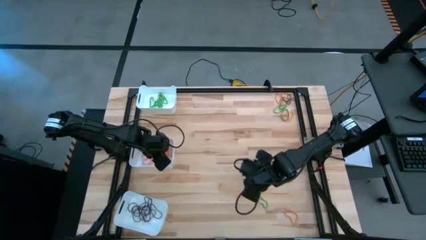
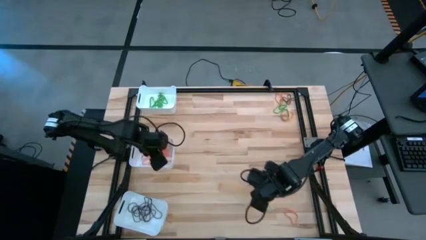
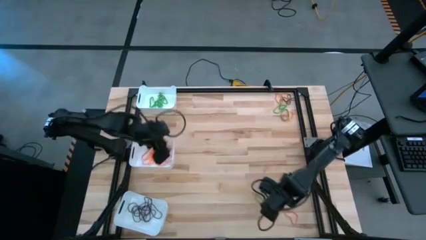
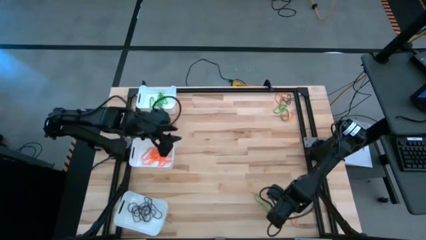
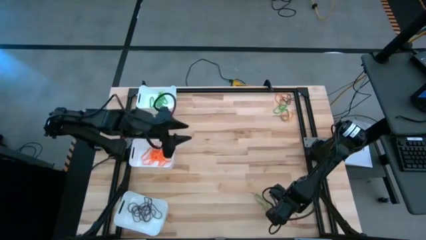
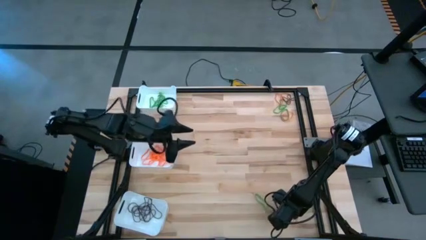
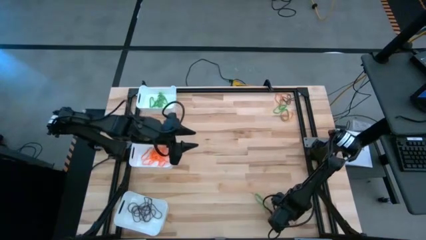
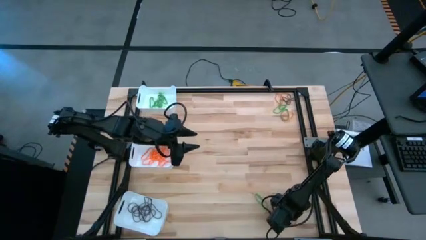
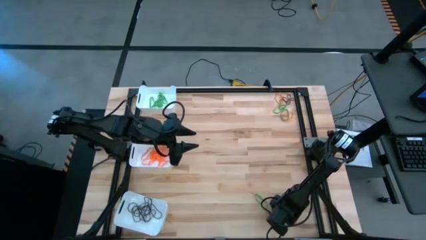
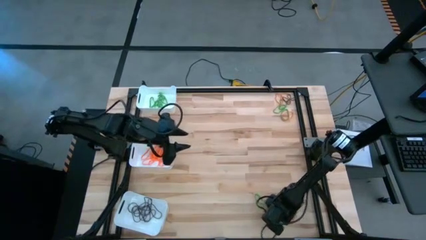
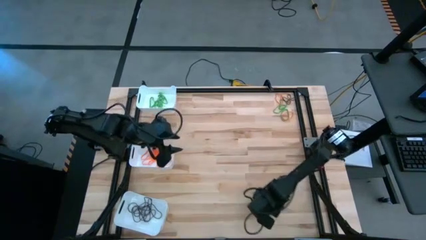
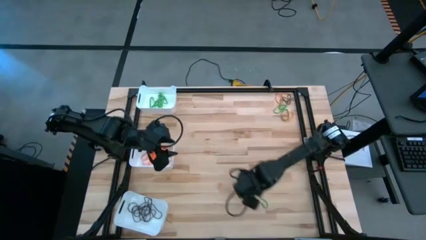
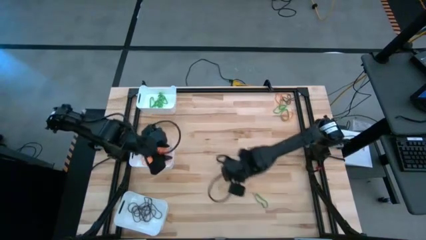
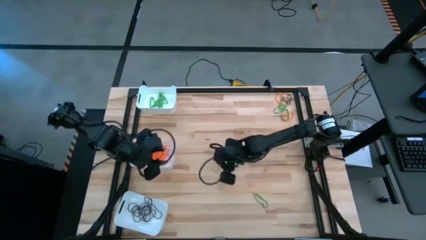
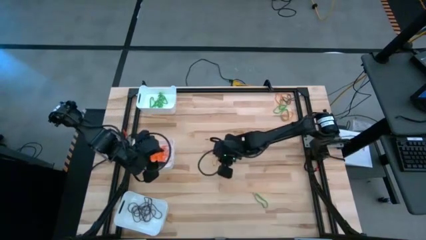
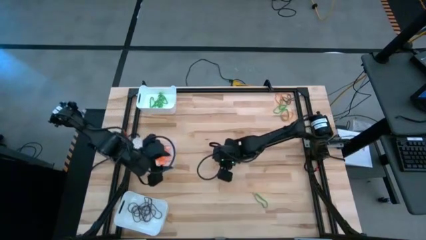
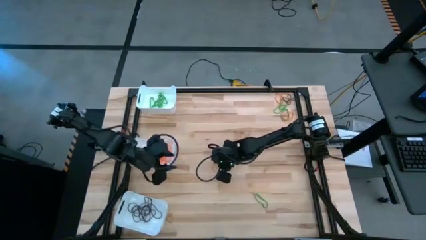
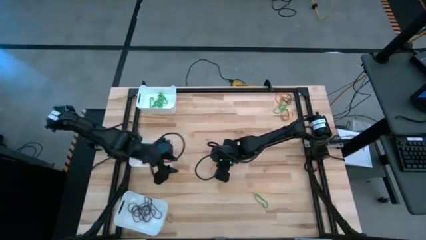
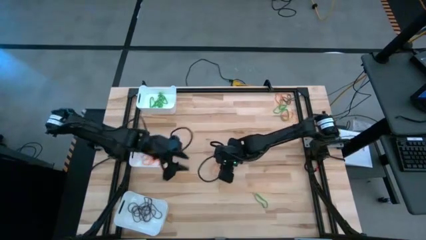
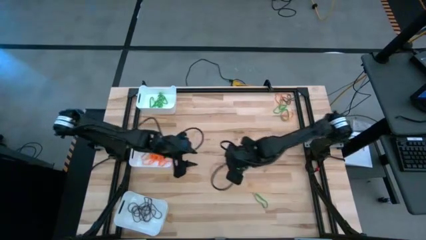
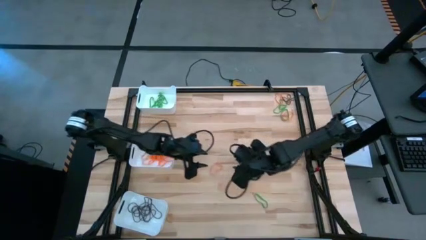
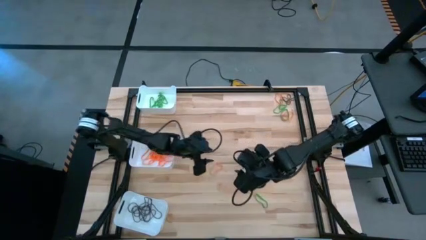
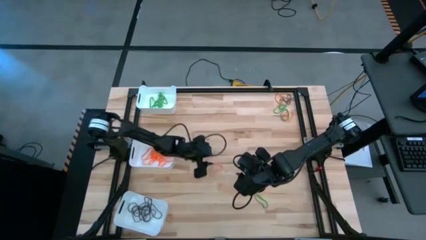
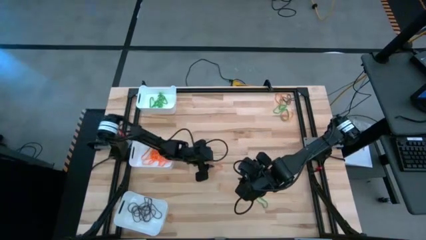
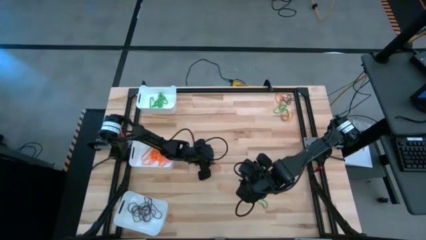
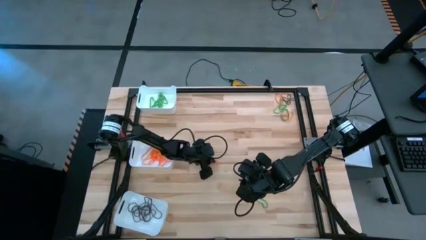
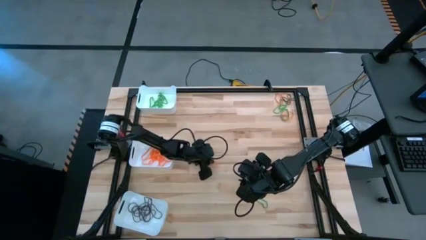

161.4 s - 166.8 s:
Task: Sort rubber bands into baskets
Put the orange rubber band into the middle white bin

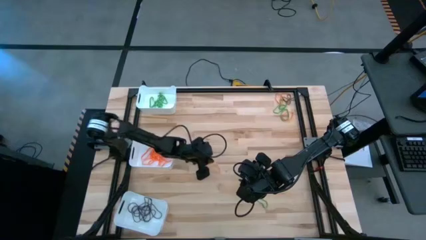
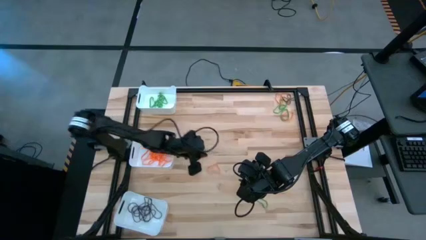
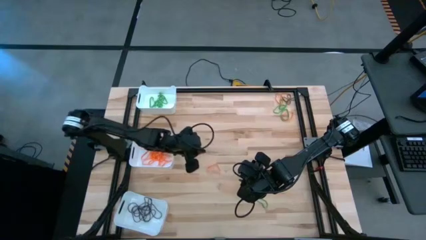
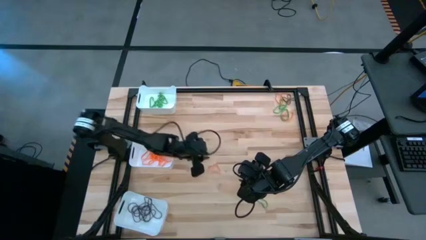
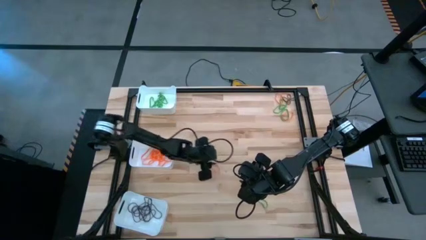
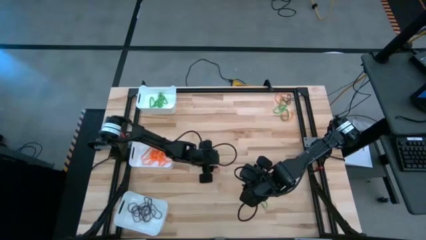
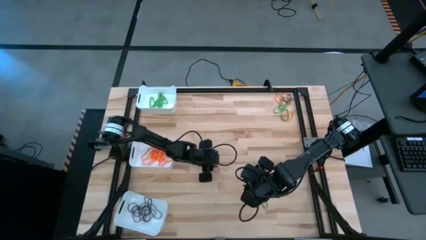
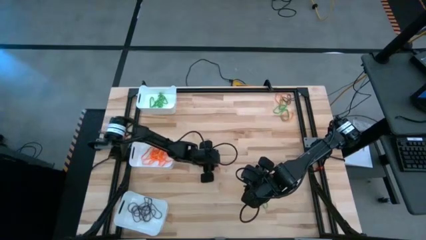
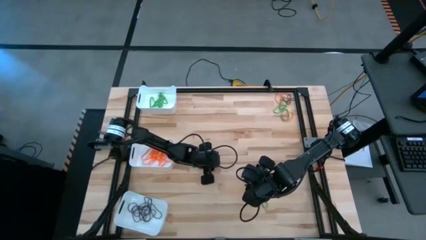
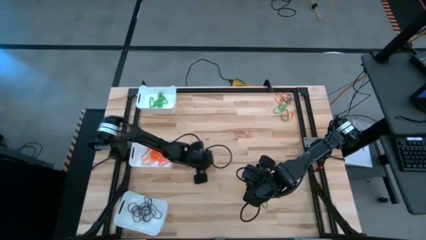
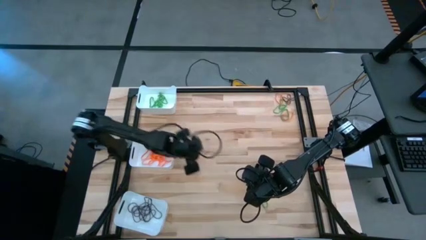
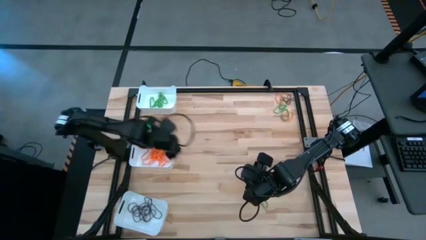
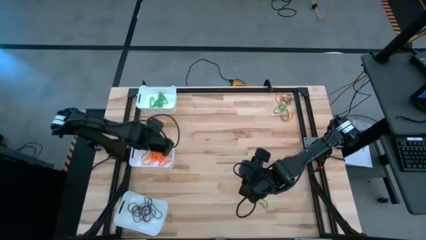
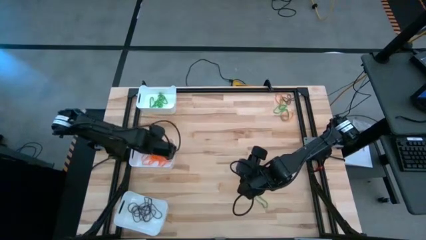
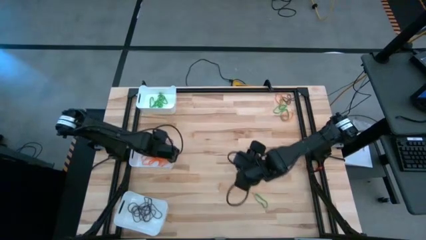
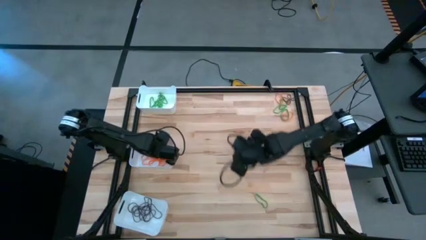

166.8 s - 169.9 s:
Put the orange rubber band into the middle white bin

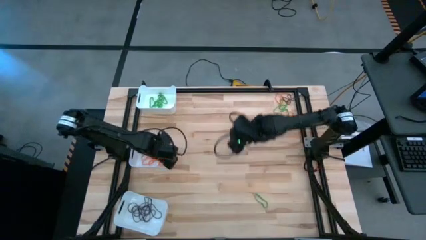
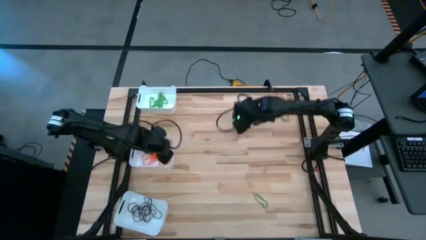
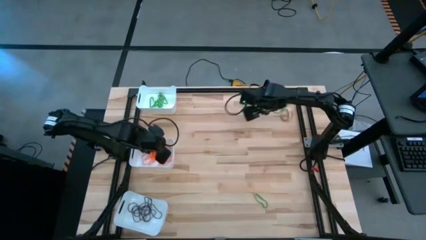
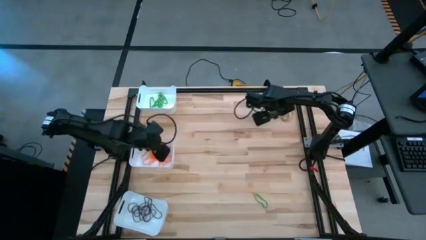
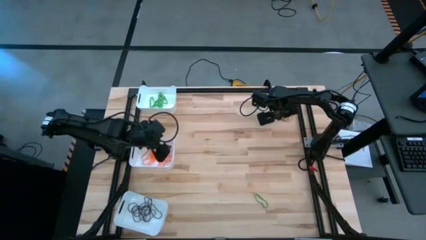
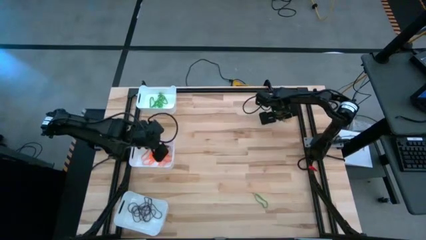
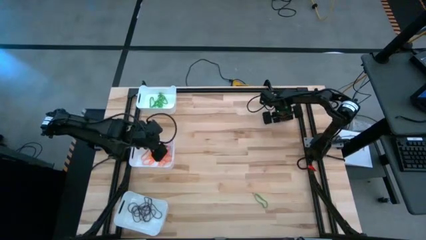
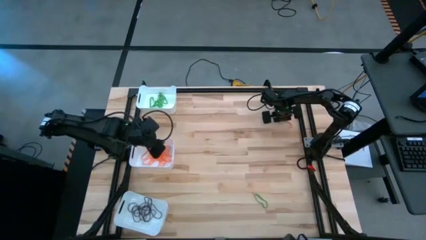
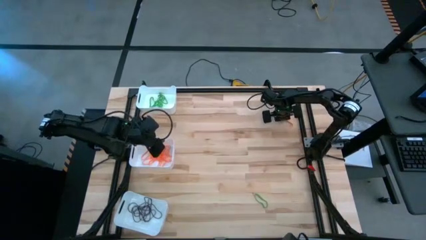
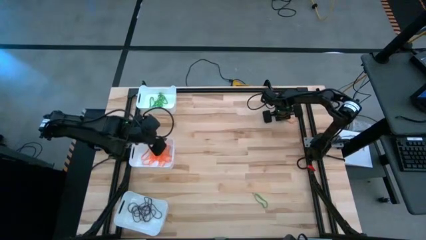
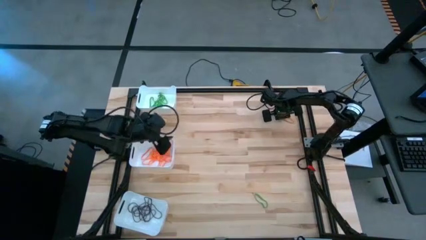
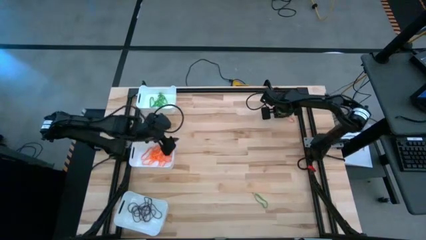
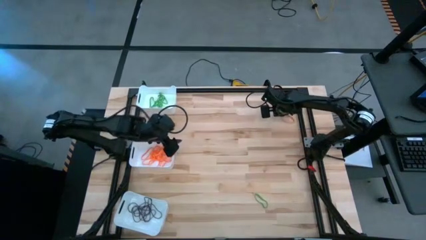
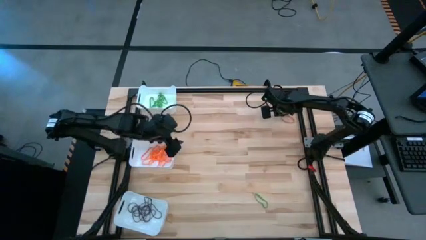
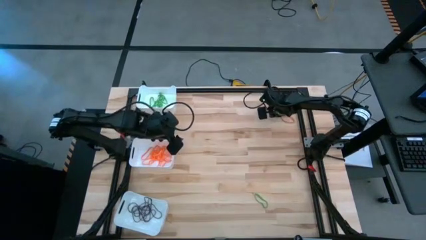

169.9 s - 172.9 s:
Put the orange rubber band into the middle white bin

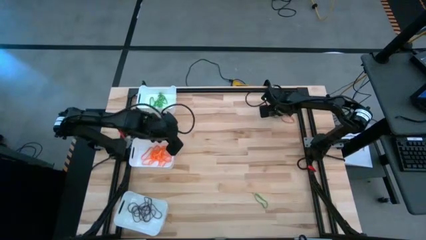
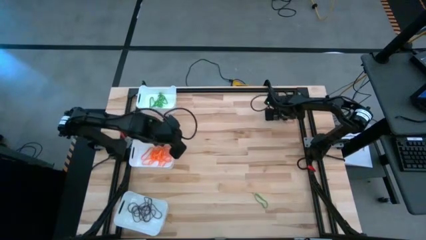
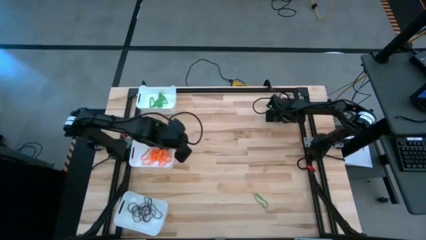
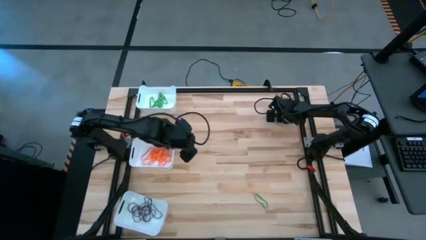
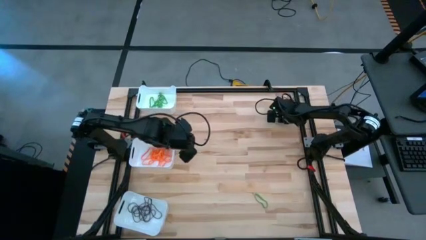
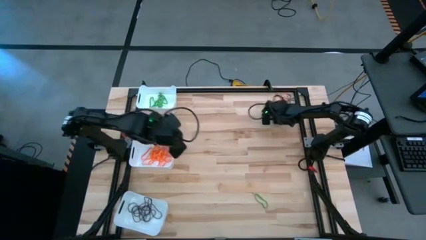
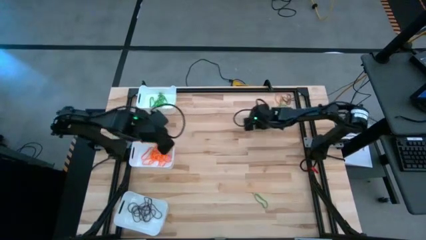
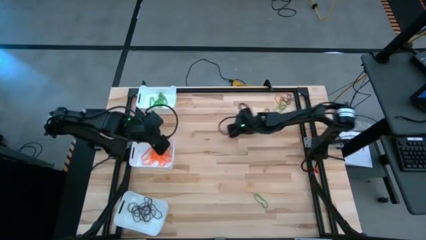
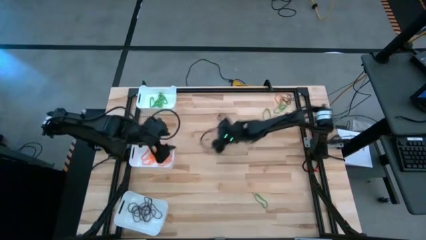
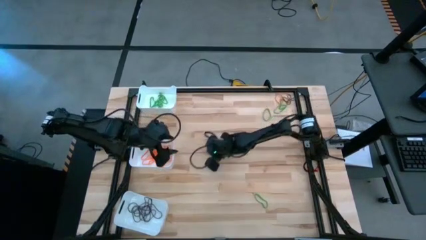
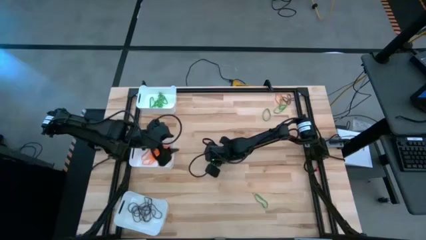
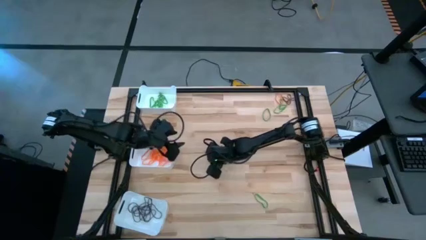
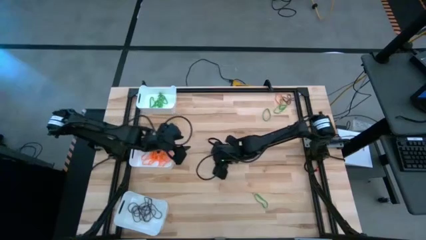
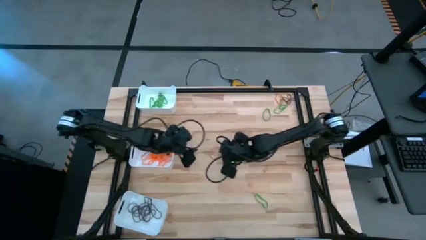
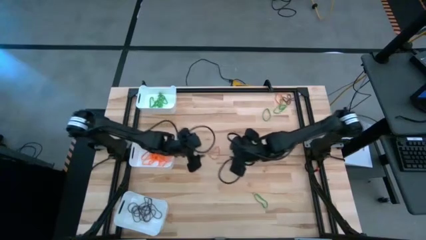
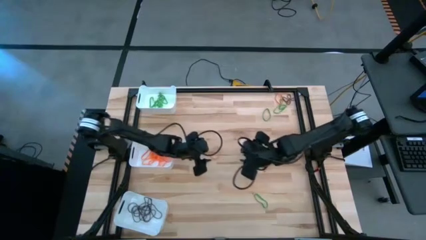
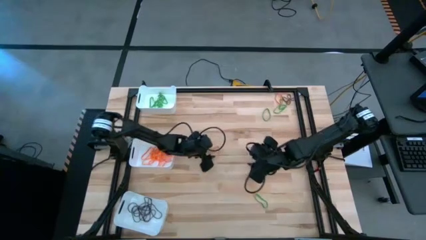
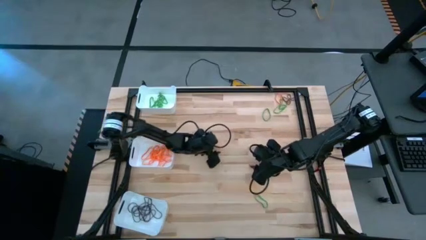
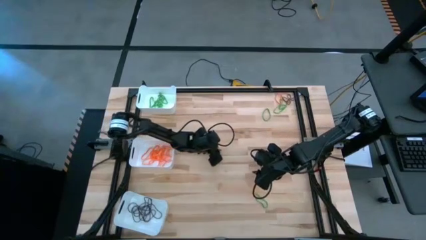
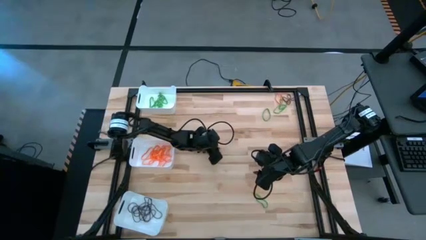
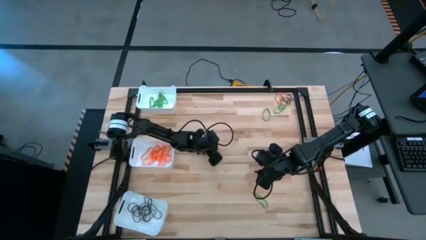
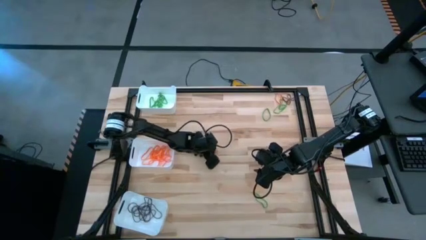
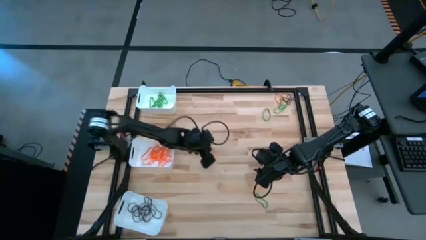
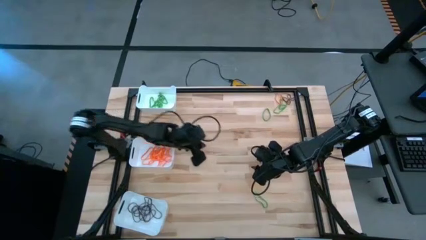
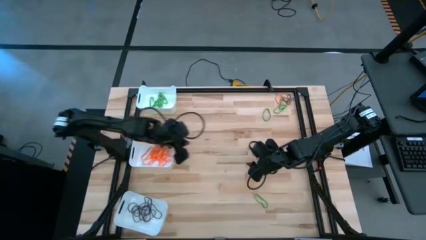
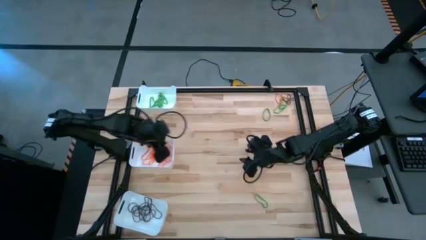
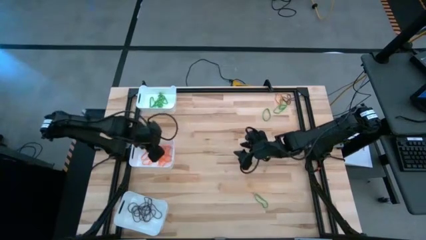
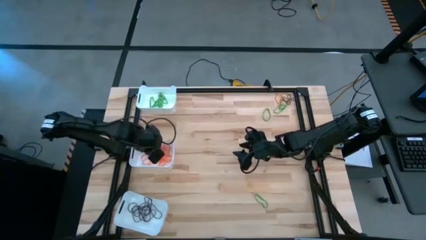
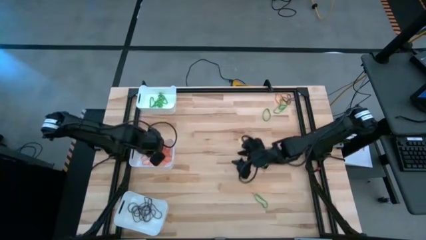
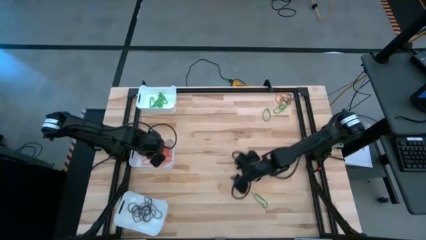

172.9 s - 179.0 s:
Put the orange rubber band into the middle white bin
